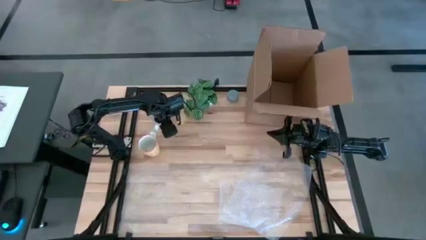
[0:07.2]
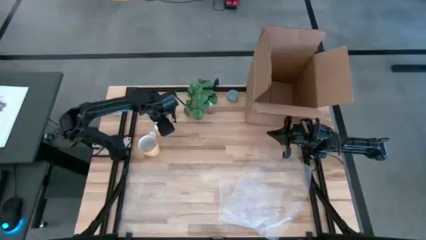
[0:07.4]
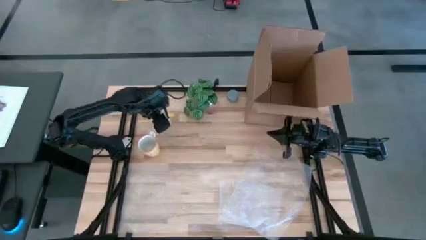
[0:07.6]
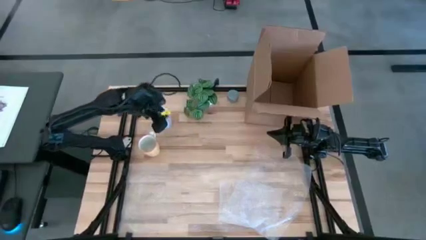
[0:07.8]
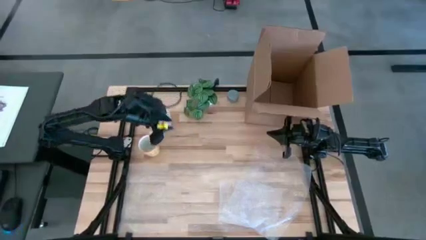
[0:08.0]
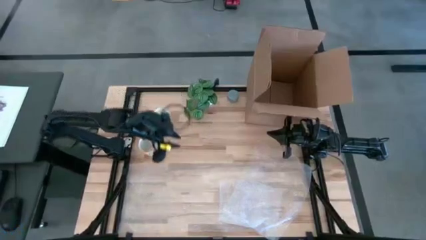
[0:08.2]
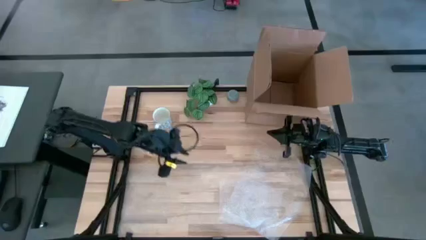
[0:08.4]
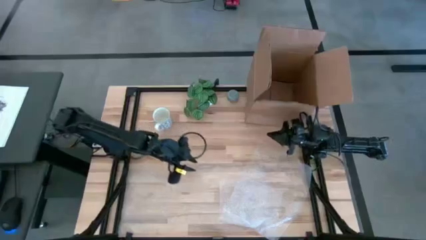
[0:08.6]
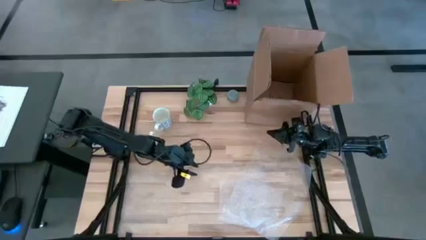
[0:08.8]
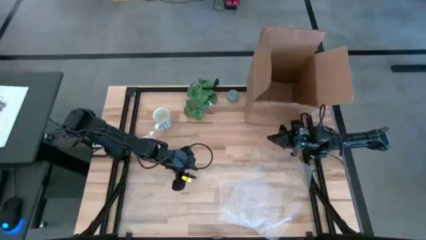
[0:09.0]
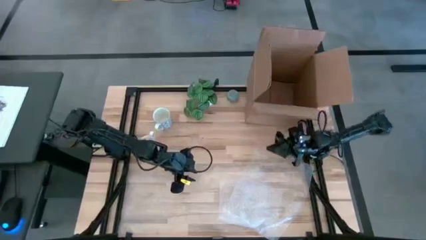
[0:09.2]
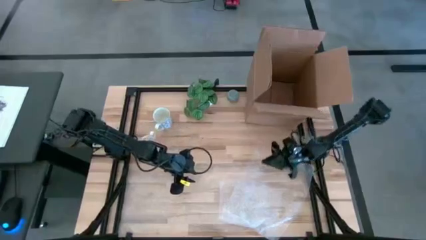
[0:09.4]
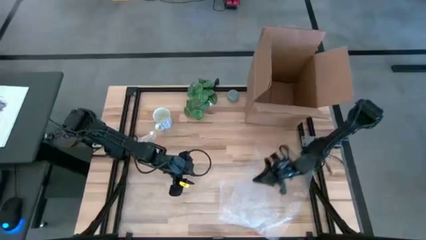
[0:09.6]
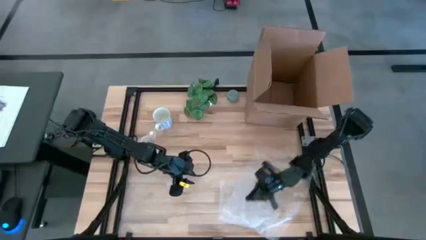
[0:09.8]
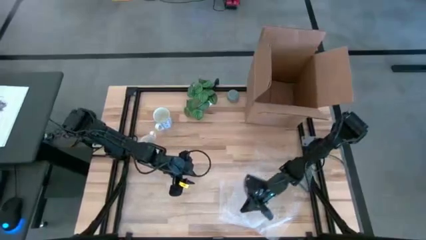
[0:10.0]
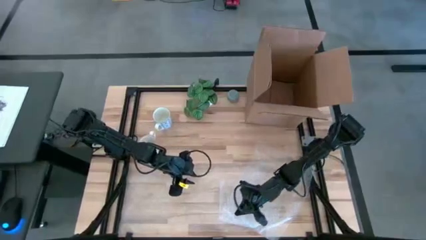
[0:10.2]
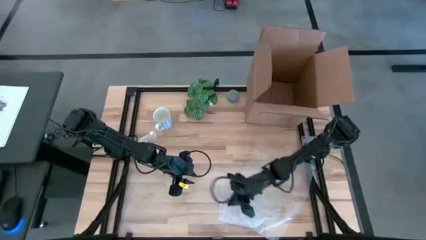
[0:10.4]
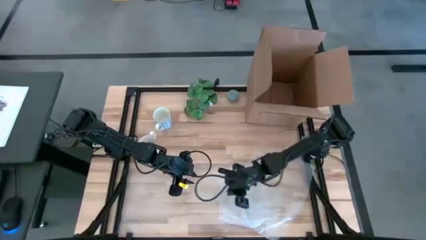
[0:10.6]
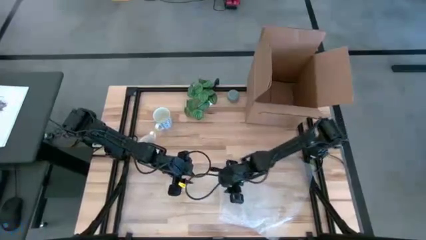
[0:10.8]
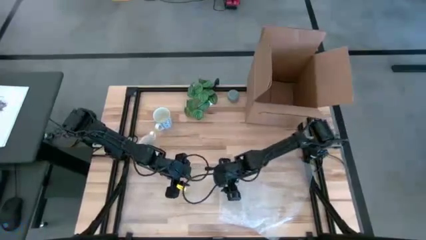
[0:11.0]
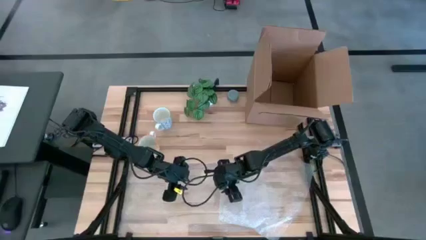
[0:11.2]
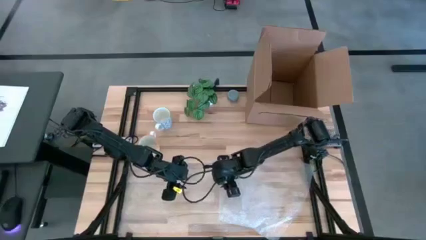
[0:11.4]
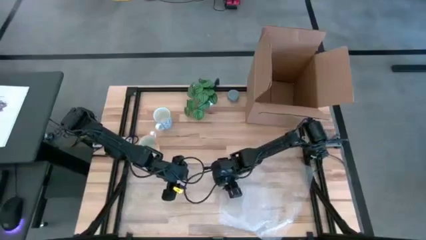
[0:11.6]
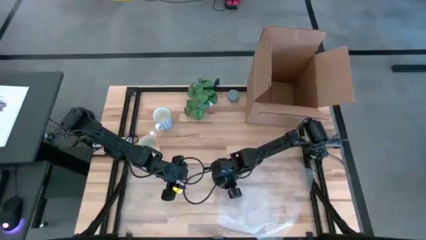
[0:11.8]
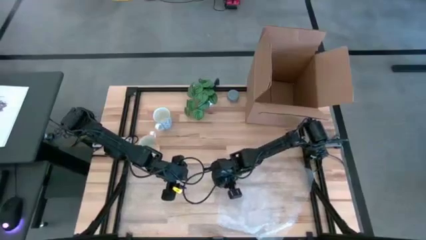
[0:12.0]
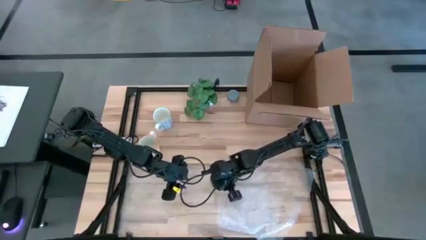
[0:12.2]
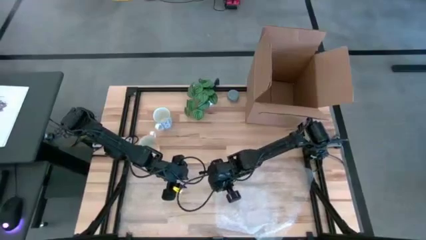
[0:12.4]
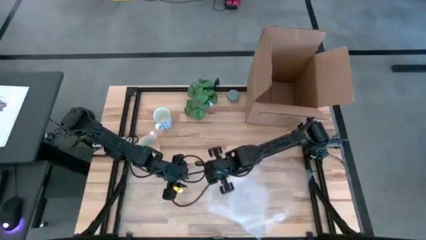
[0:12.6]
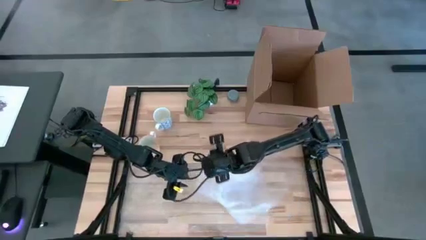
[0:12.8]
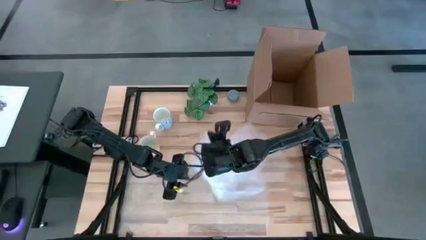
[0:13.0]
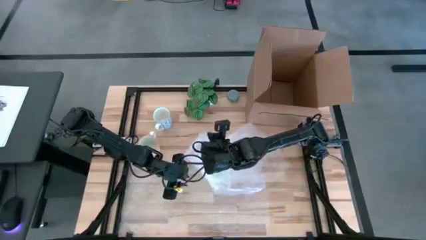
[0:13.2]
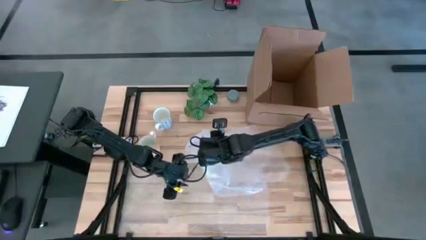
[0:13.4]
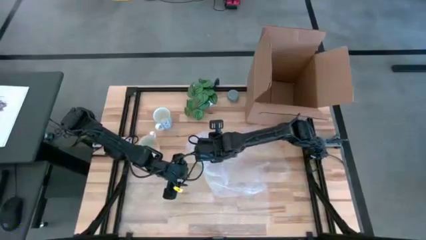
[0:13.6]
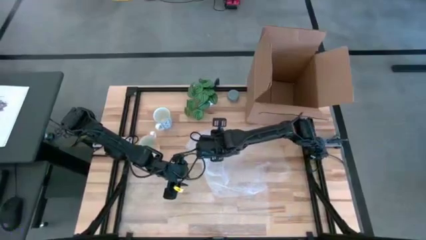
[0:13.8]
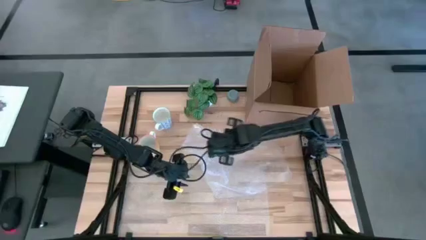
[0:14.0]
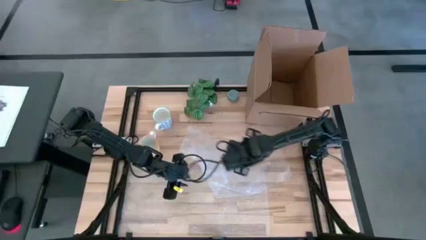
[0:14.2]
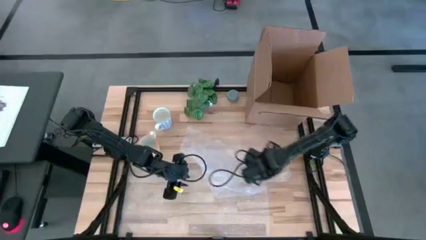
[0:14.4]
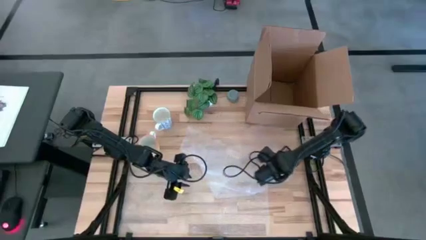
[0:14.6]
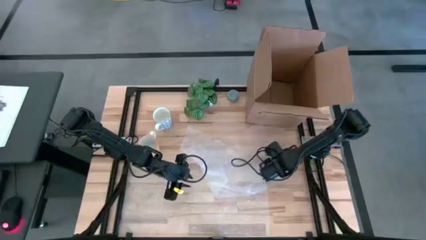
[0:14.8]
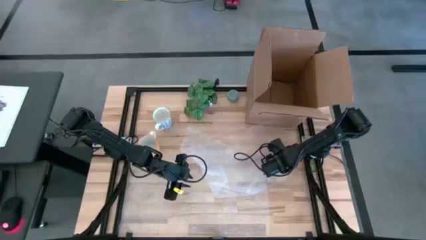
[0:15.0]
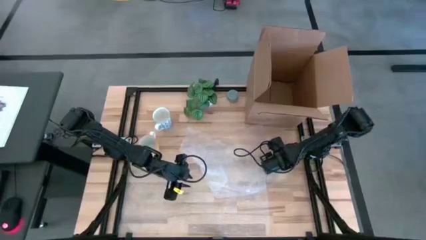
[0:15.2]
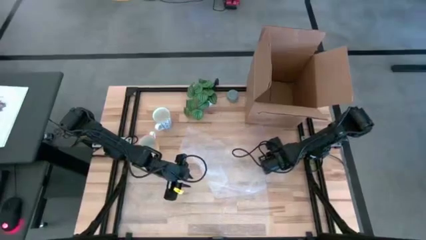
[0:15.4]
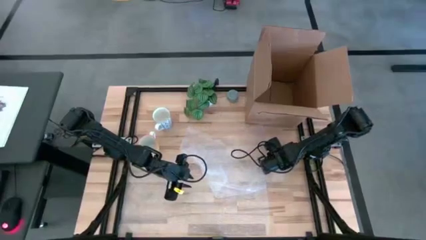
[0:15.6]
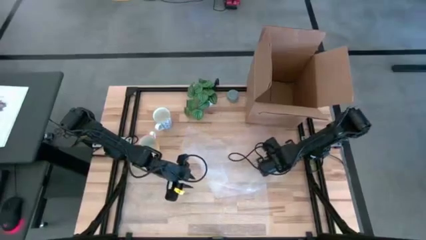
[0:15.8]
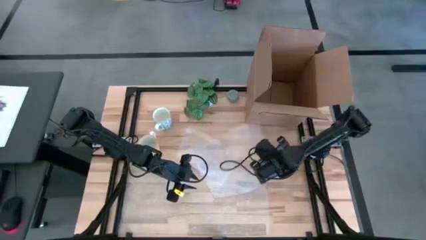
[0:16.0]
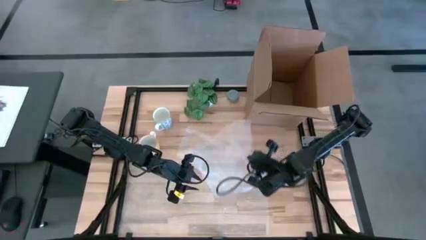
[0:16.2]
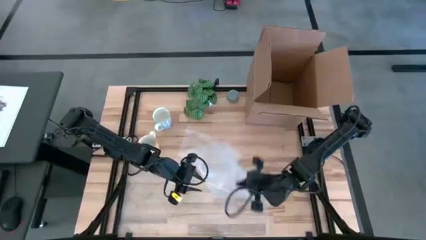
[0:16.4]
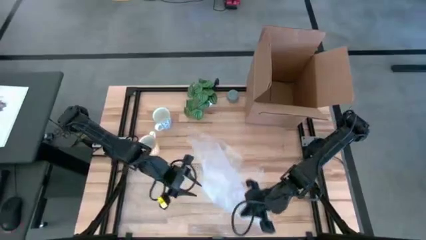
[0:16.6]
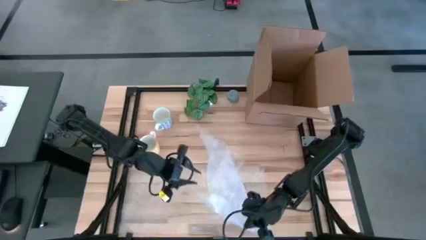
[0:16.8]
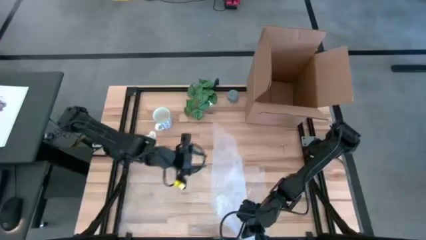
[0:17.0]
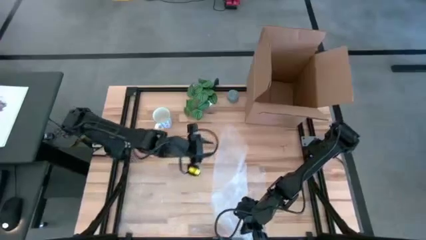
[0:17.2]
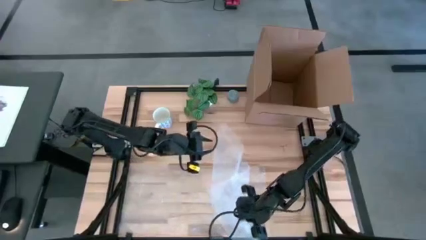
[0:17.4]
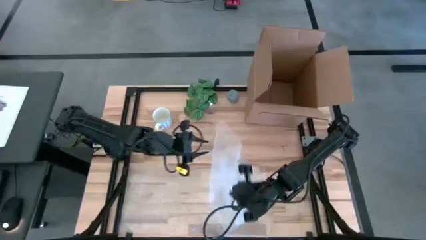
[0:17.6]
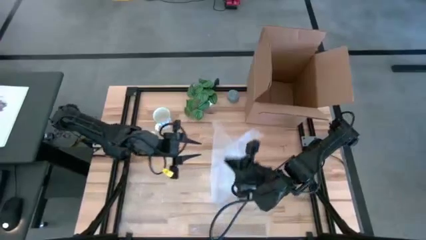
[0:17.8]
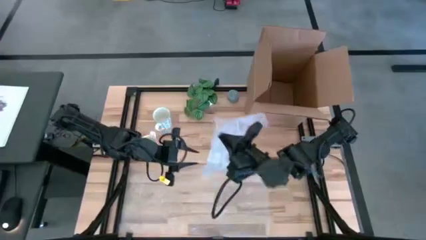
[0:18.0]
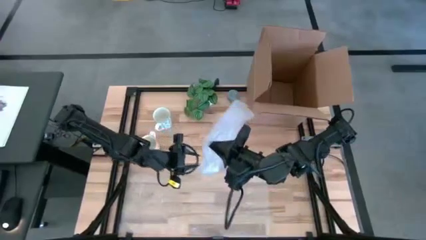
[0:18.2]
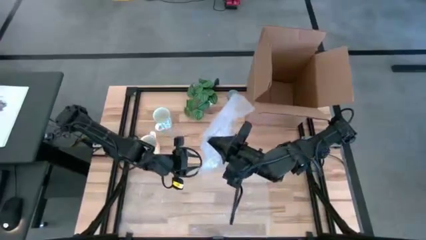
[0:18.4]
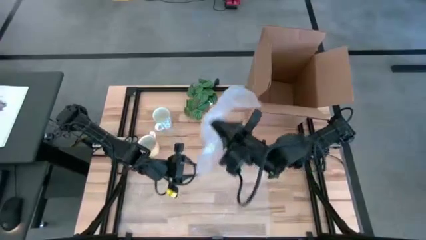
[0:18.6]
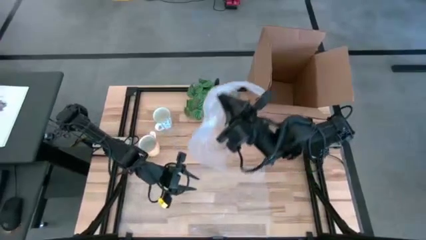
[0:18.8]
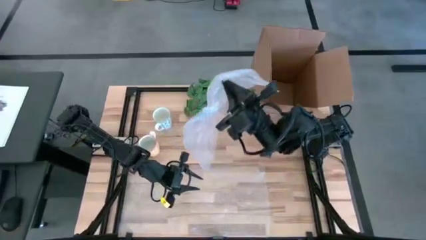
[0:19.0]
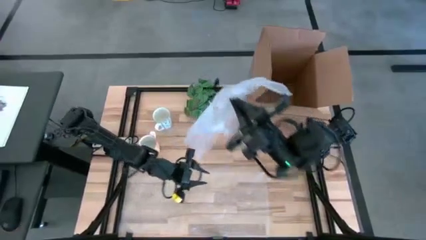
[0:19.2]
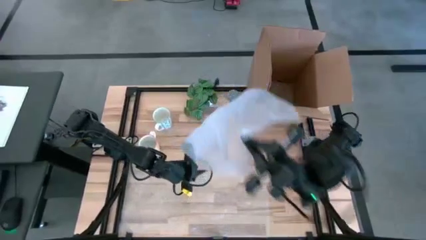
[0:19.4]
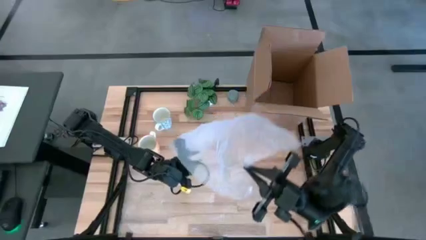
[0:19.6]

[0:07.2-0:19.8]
Task: wrap mug
Prepare the bubble wrap in the center of the table
